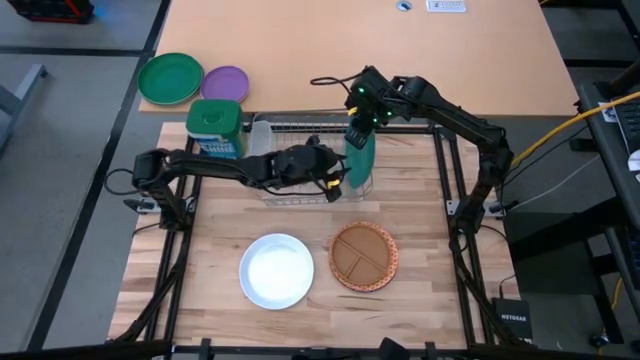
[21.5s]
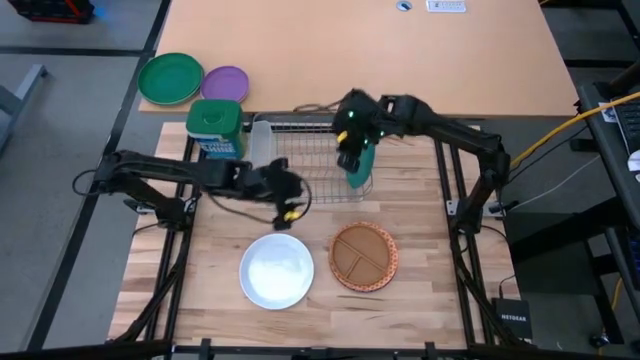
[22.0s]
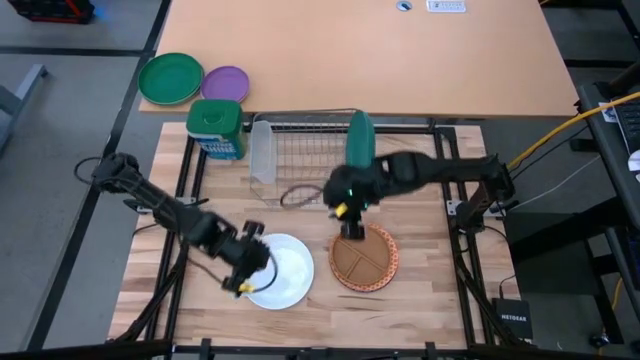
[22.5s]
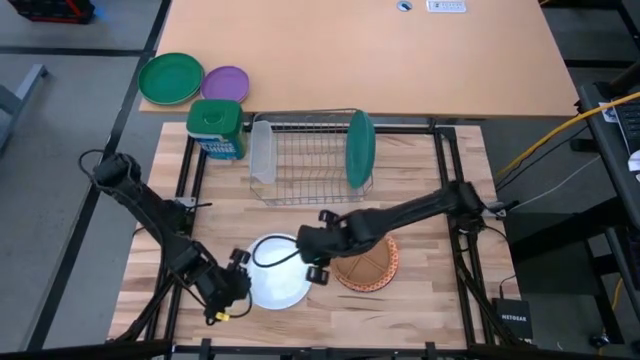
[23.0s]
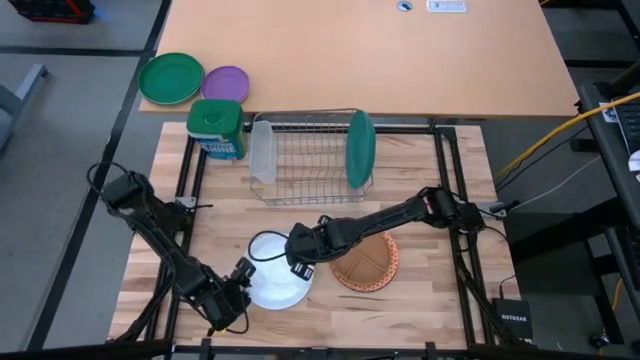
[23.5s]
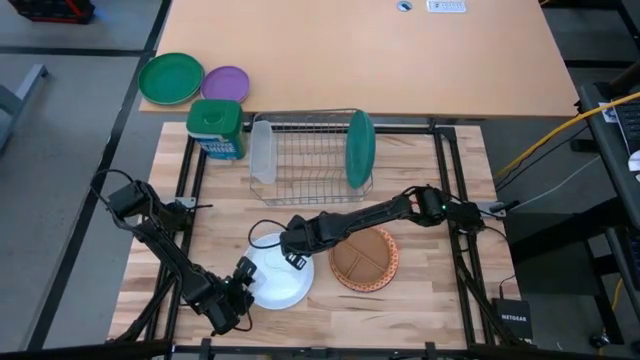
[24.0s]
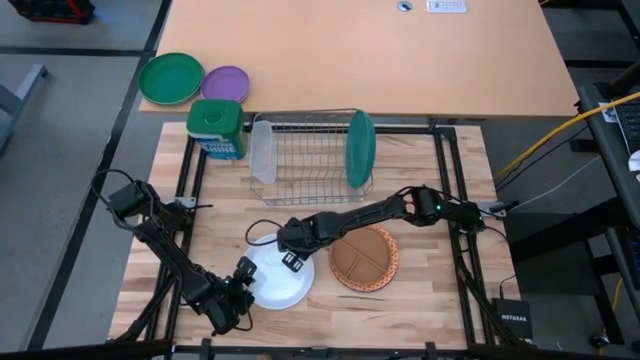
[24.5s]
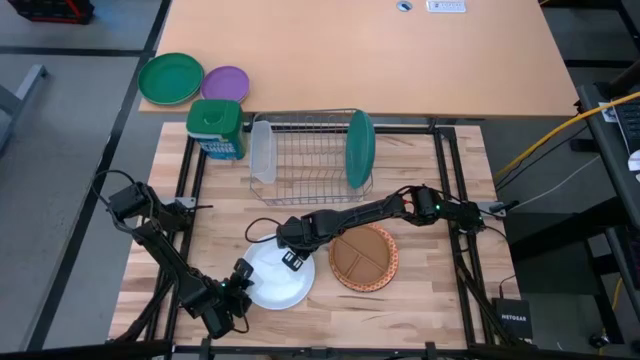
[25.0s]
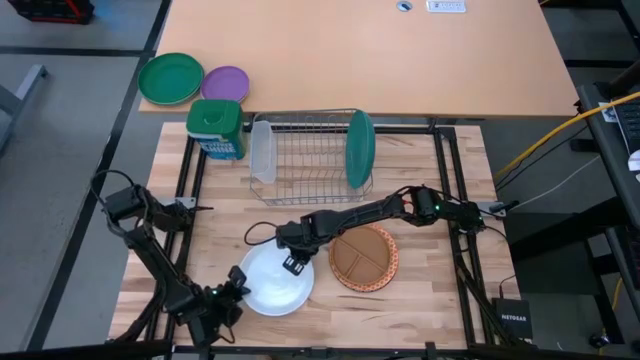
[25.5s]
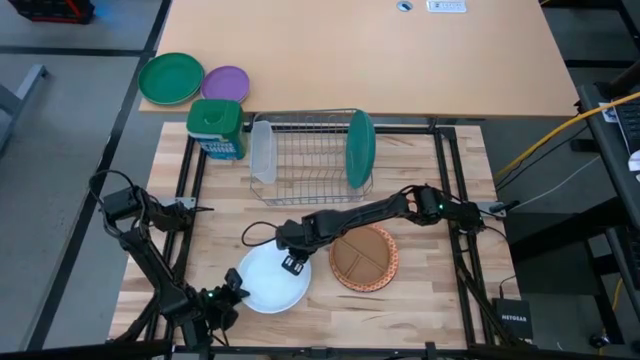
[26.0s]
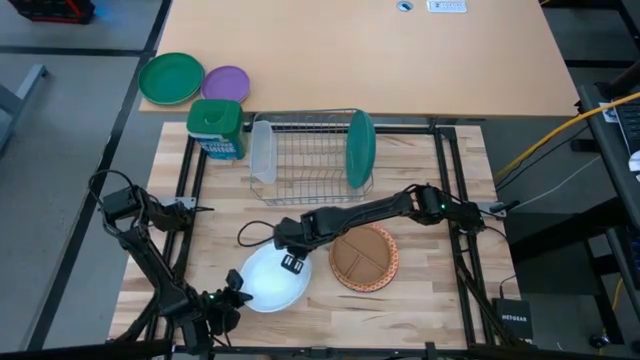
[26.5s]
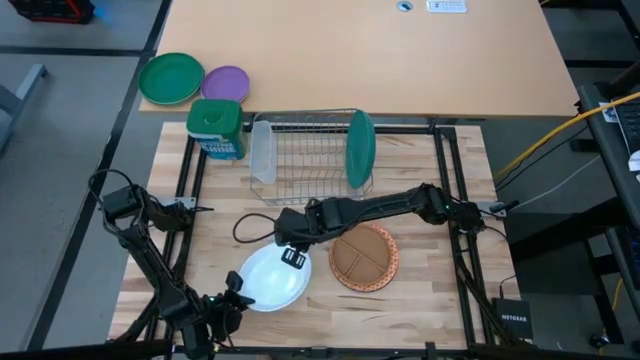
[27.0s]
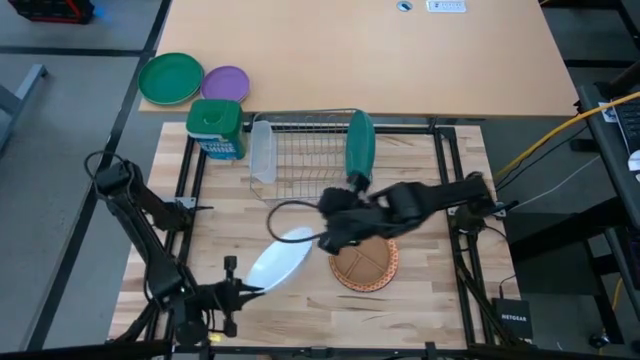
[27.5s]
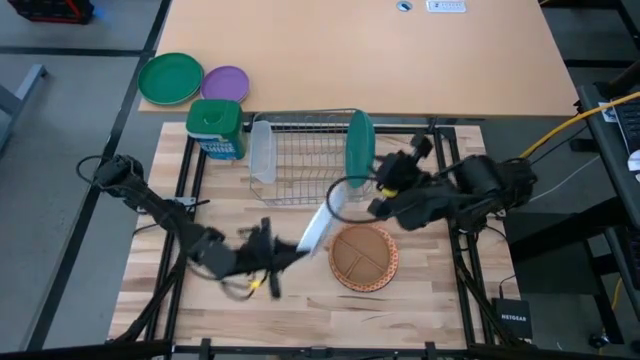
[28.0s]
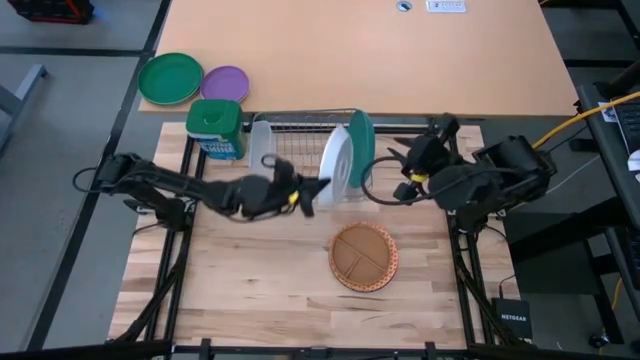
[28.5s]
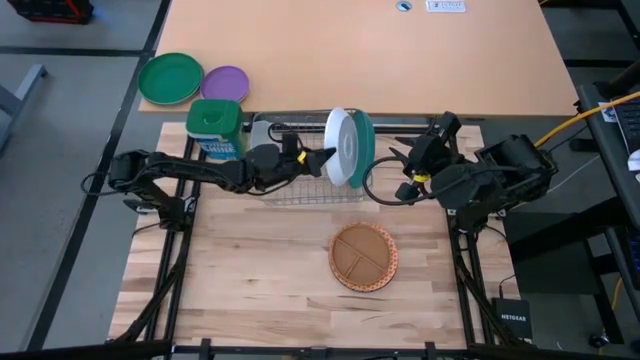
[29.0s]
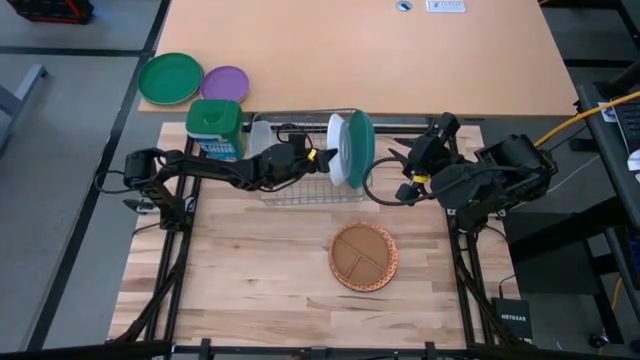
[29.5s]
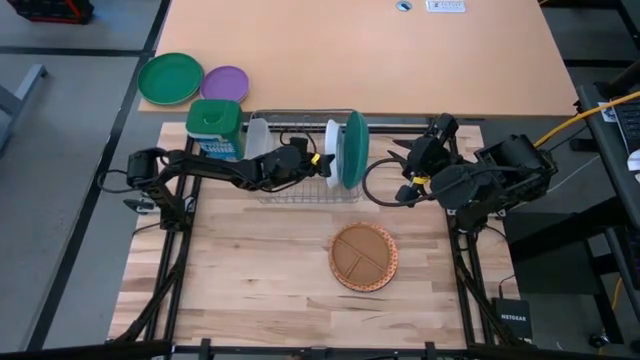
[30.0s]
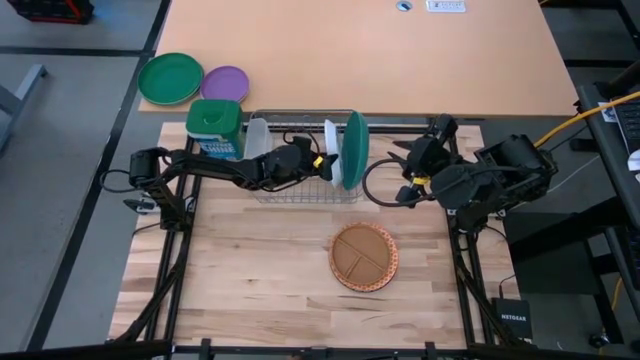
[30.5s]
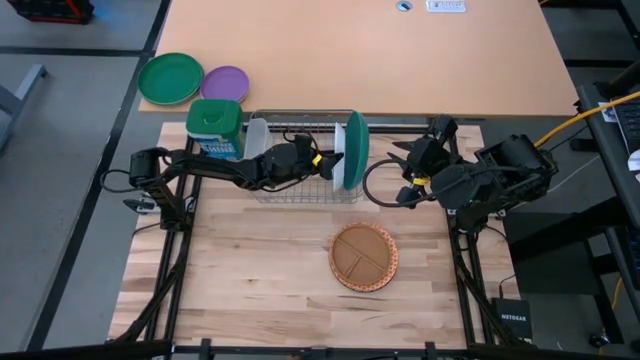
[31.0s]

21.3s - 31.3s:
Task: Sort dishes
Put the white plate in the dish rack

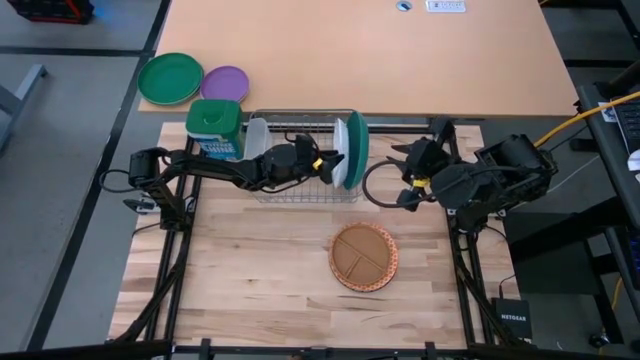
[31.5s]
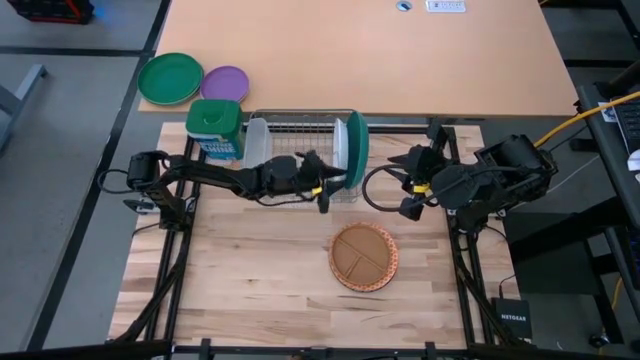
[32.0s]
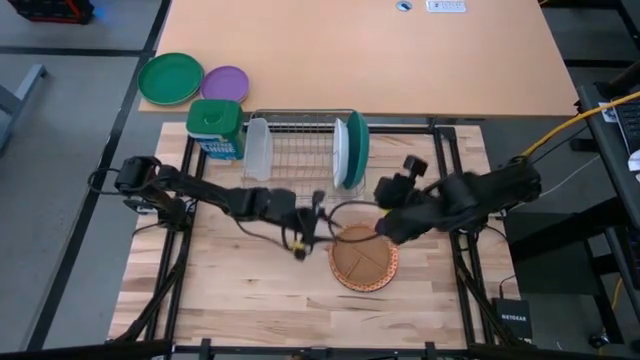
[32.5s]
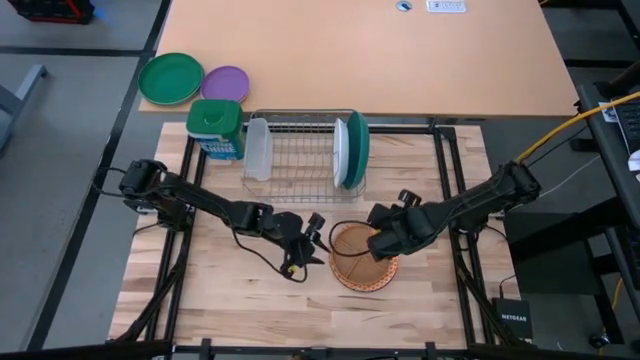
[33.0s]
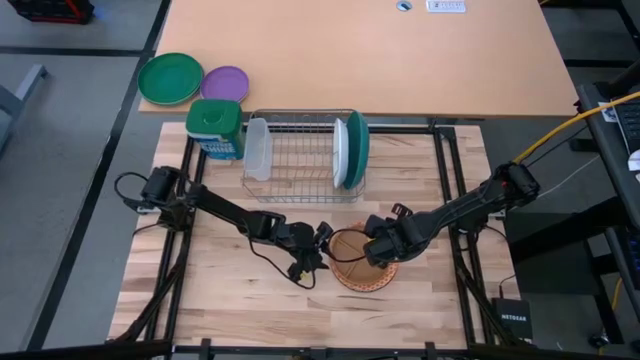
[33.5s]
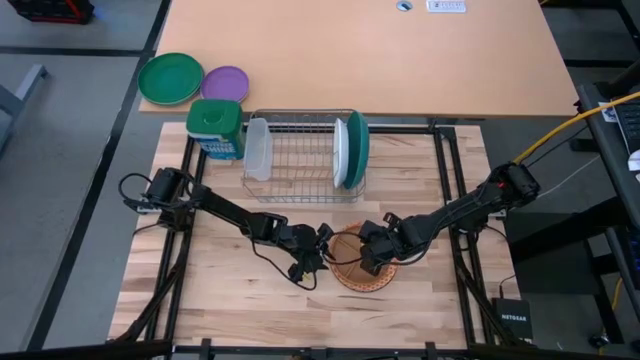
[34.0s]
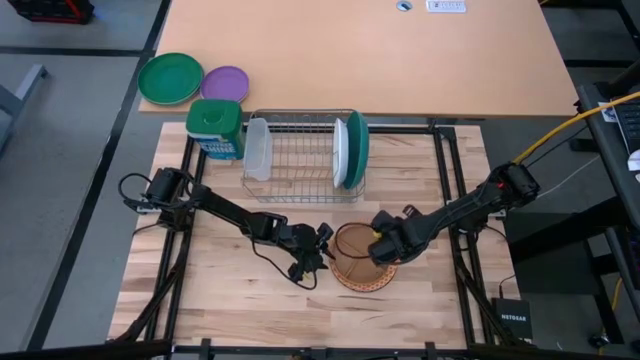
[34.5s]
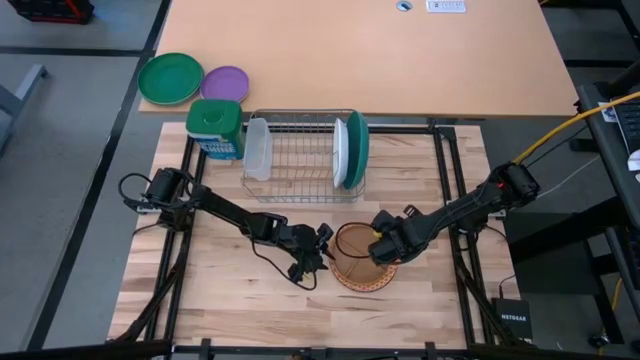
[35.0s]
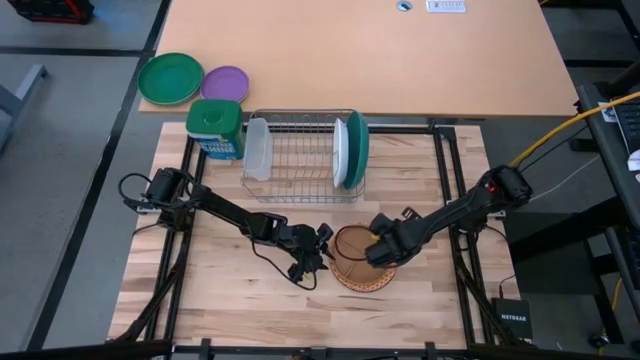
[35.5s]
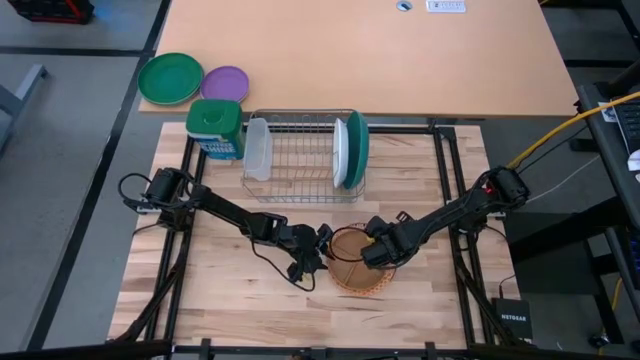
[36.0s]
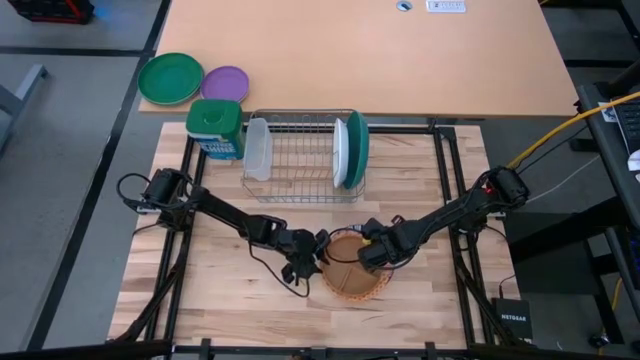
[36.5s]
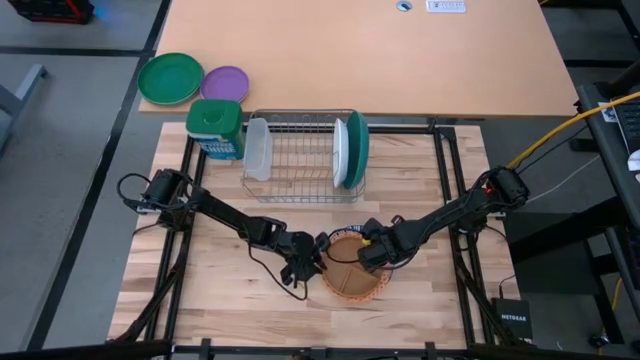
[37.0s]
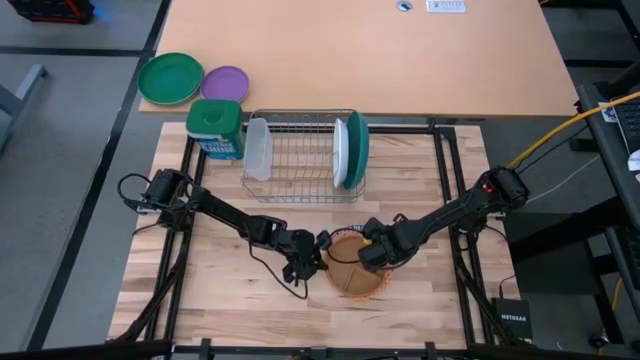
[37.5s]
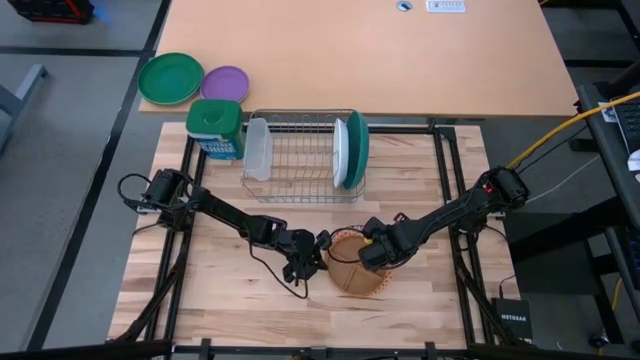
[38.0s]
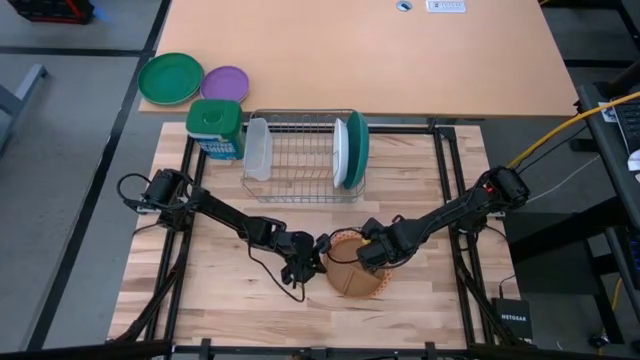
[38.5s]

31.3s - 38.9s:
Put the brown plate in the dish rack

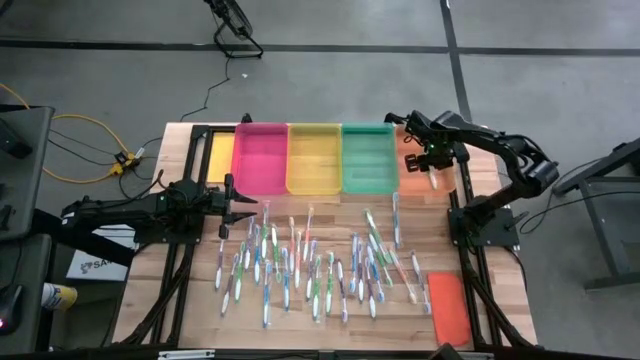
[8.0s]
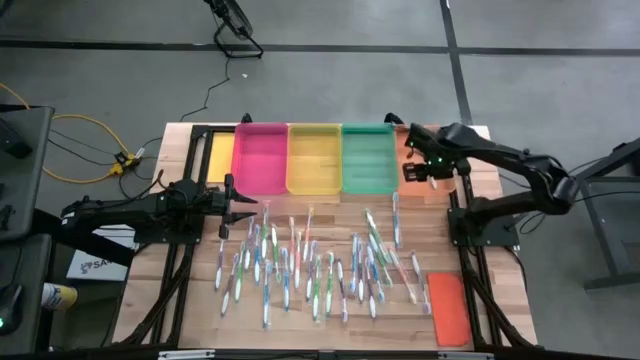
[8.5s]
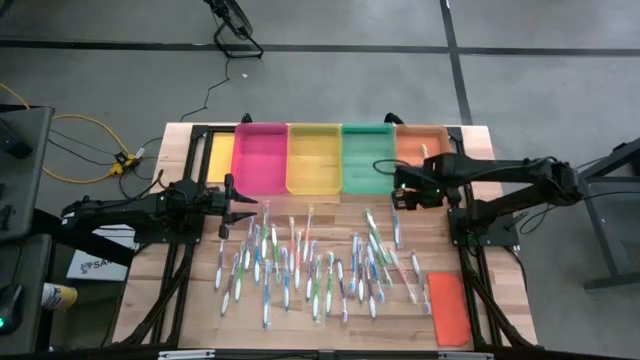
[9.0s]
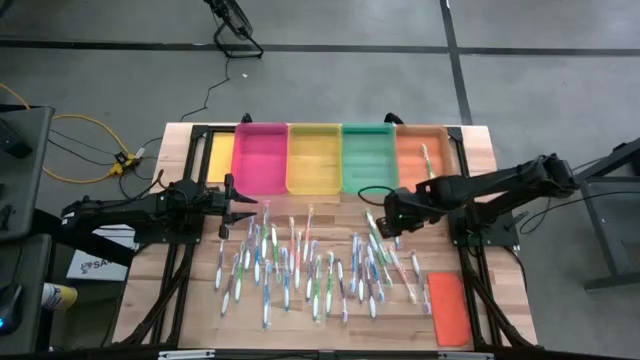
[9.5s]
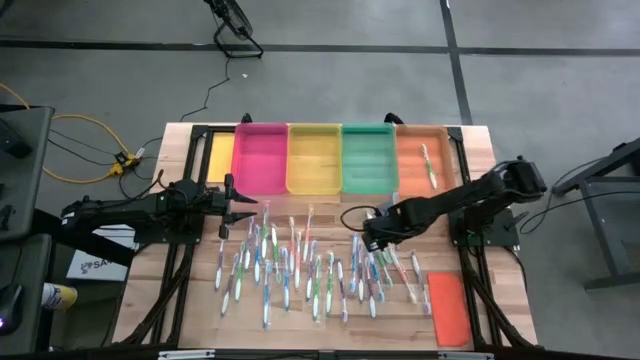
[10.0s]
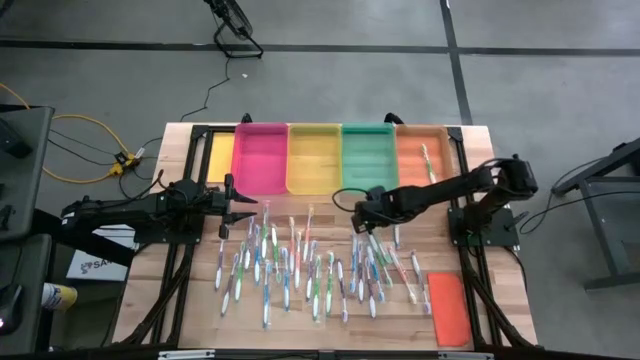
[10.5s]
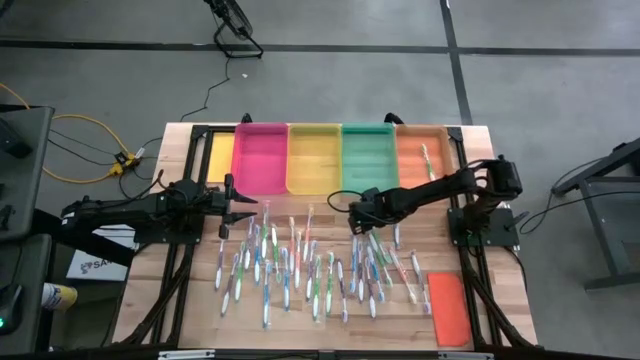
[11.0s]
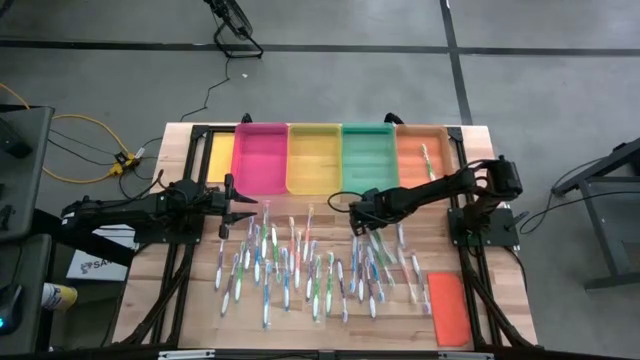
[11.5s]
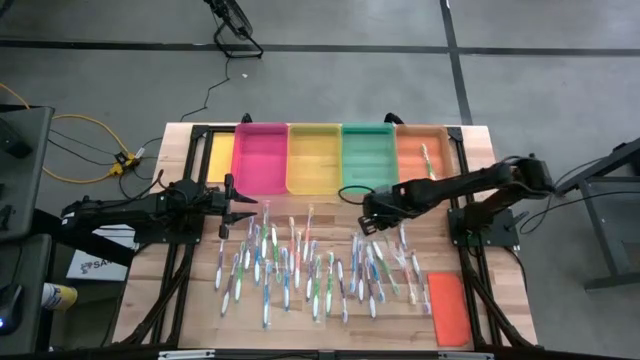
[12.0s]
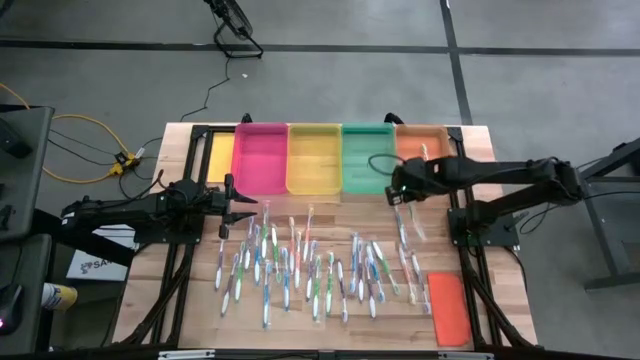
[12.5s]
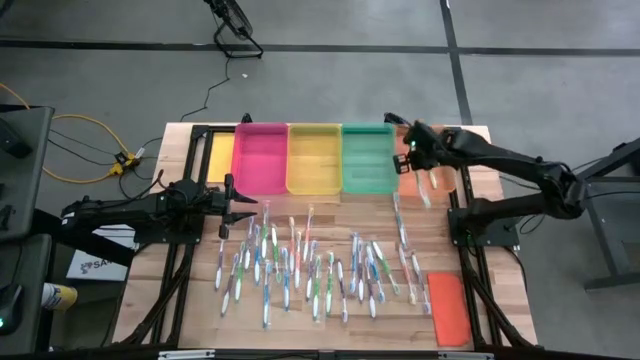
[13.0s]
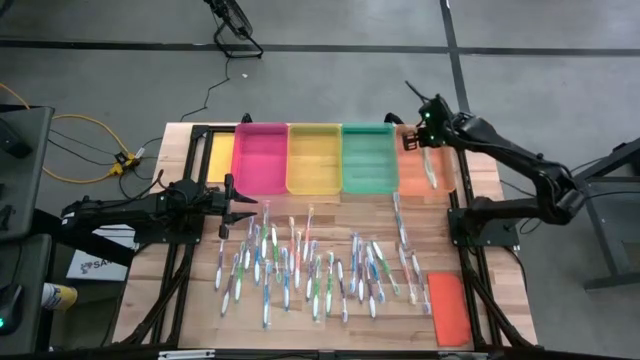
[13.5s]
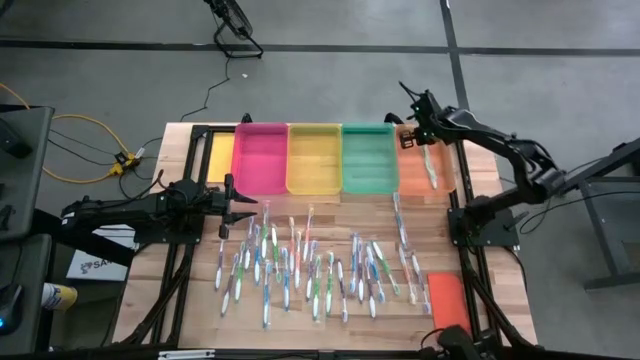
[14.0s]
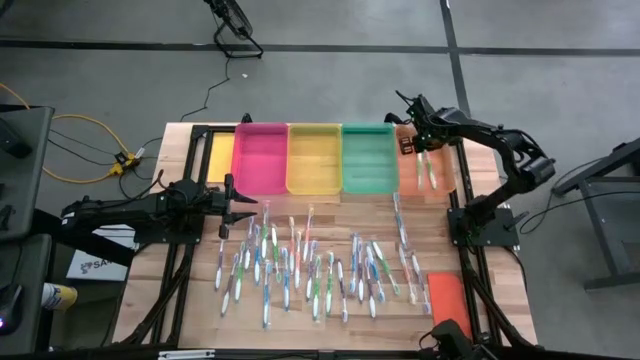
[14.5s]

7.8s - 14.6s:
Task: Pick & Place Toothbrushes
Put the green toothbrush into the orange bin
